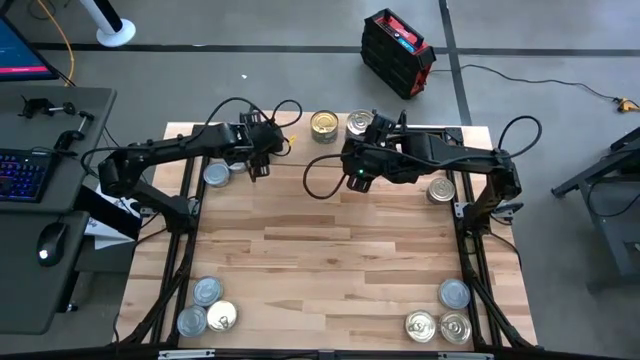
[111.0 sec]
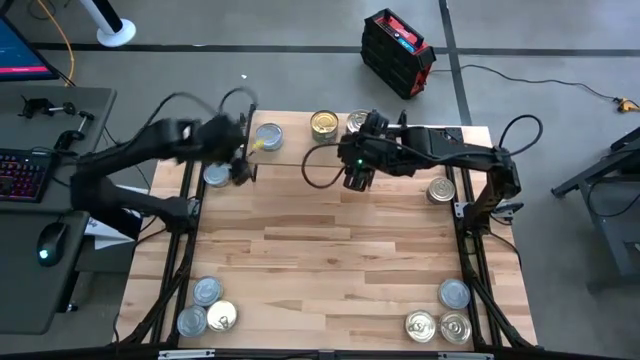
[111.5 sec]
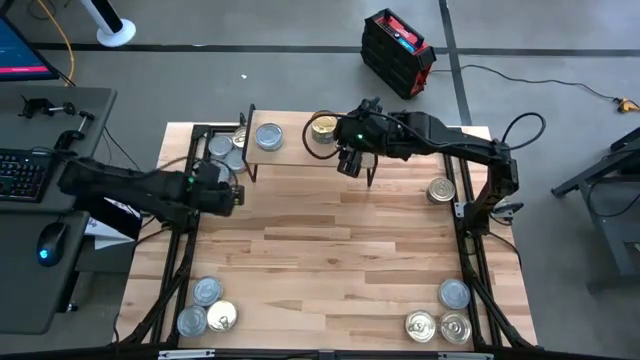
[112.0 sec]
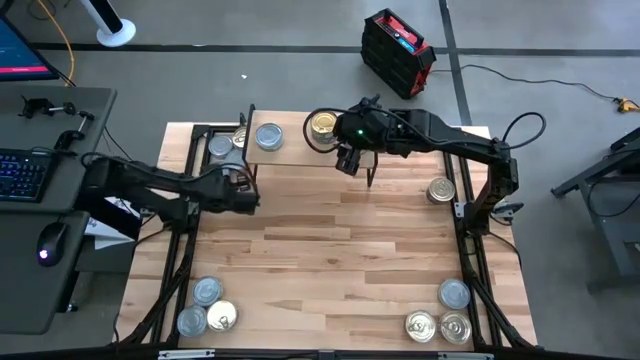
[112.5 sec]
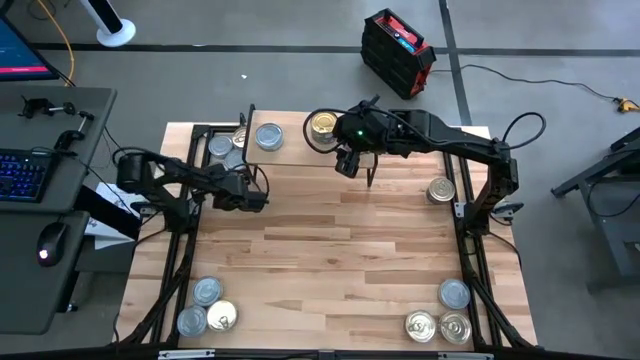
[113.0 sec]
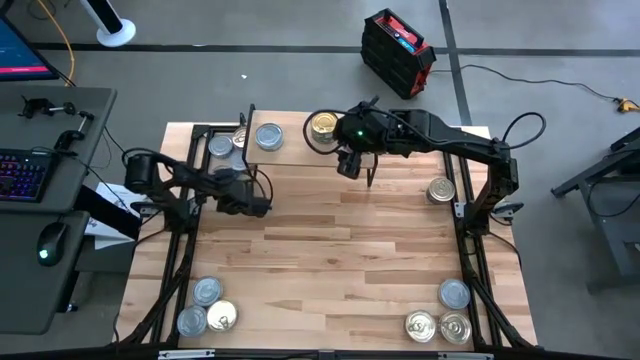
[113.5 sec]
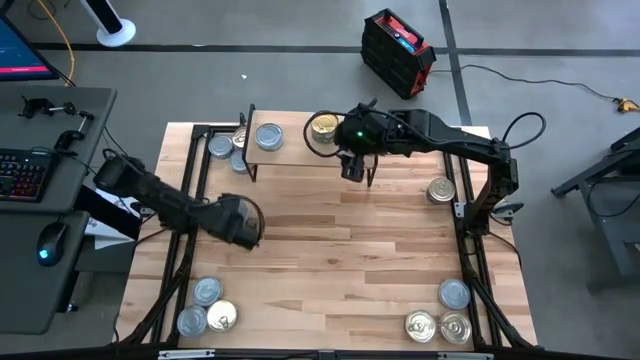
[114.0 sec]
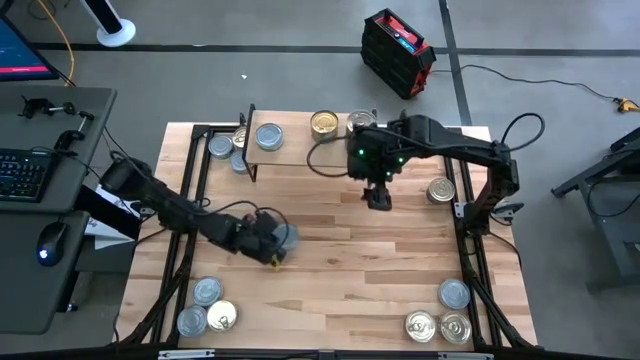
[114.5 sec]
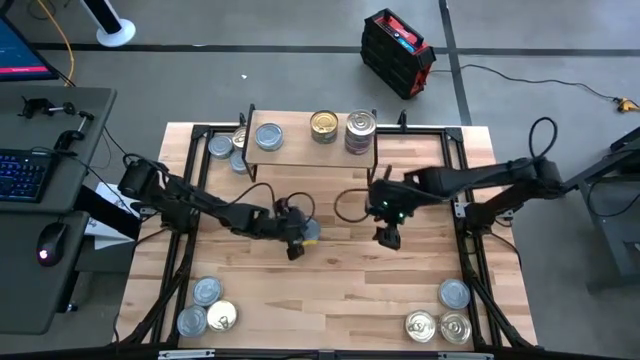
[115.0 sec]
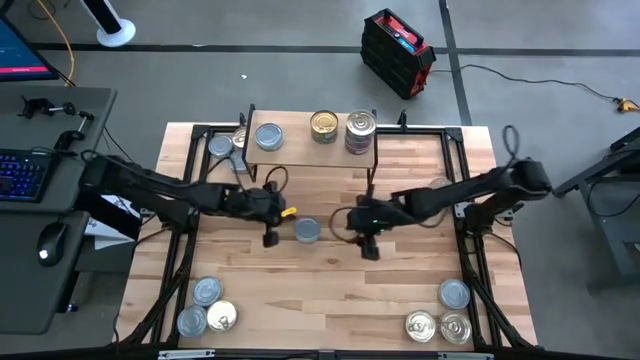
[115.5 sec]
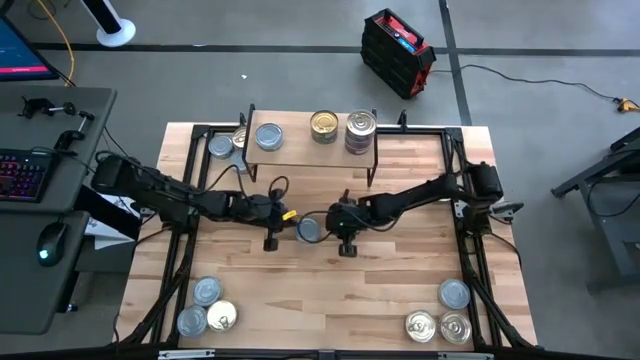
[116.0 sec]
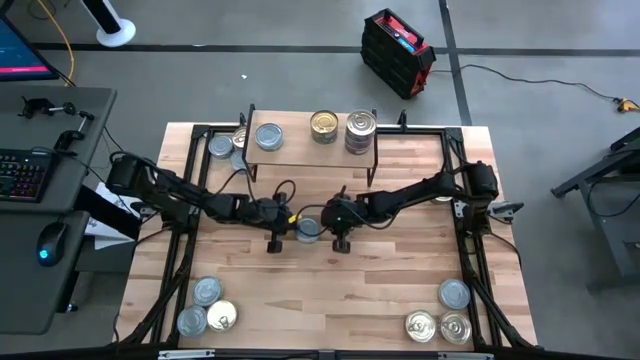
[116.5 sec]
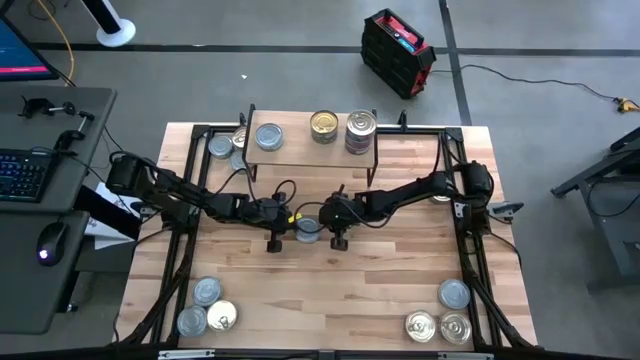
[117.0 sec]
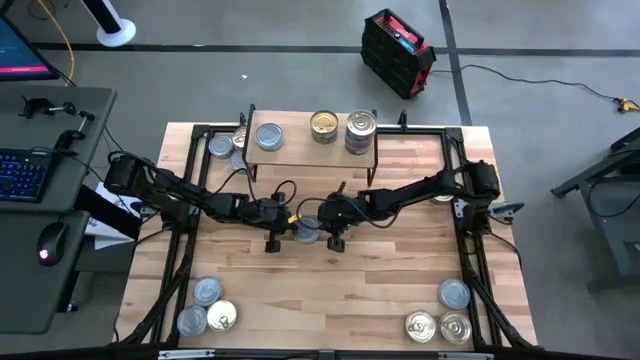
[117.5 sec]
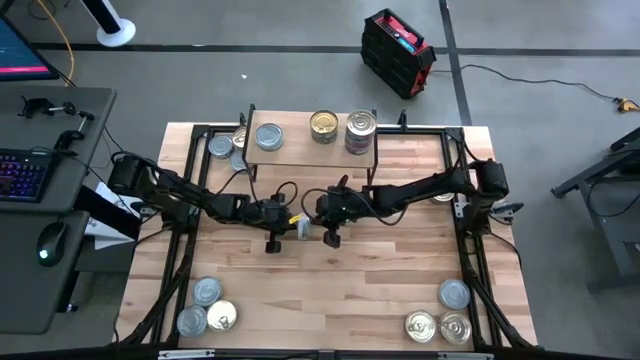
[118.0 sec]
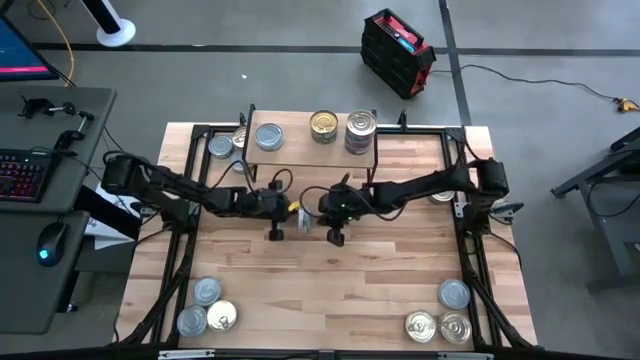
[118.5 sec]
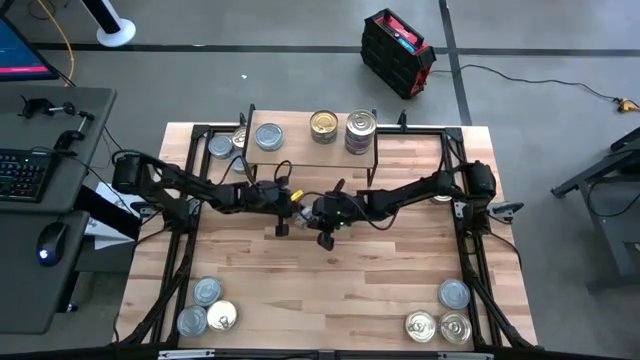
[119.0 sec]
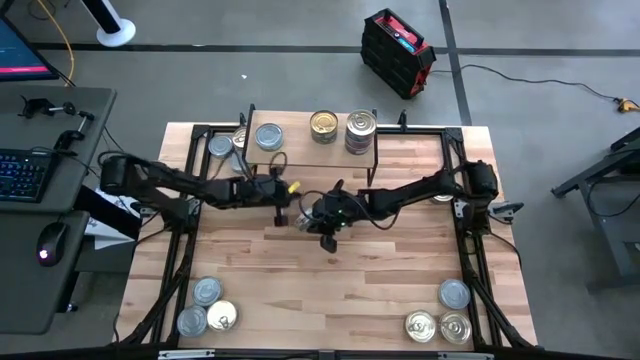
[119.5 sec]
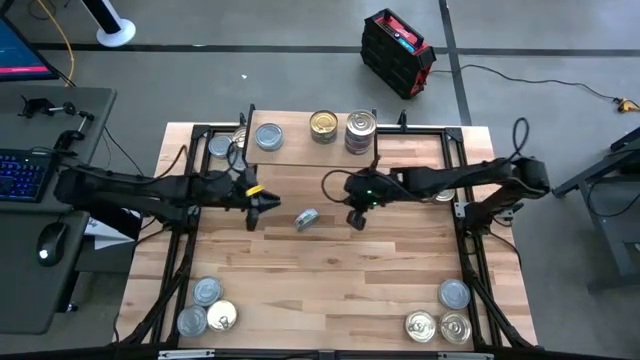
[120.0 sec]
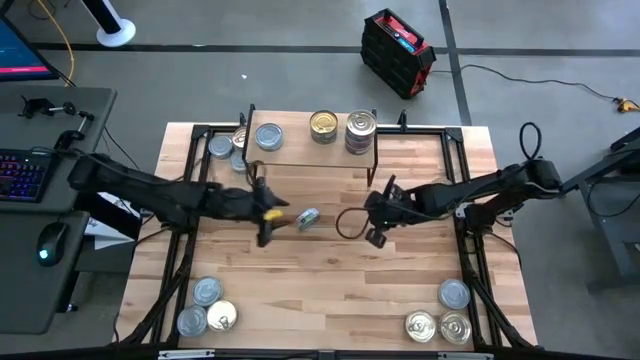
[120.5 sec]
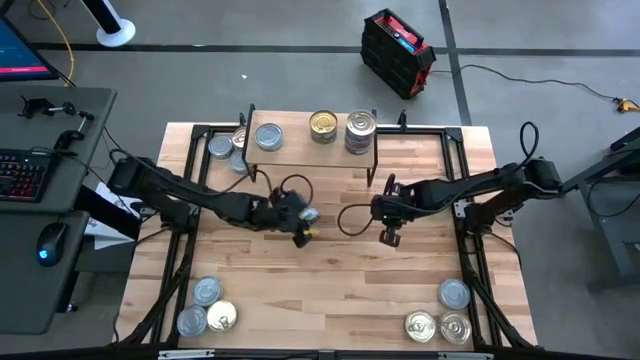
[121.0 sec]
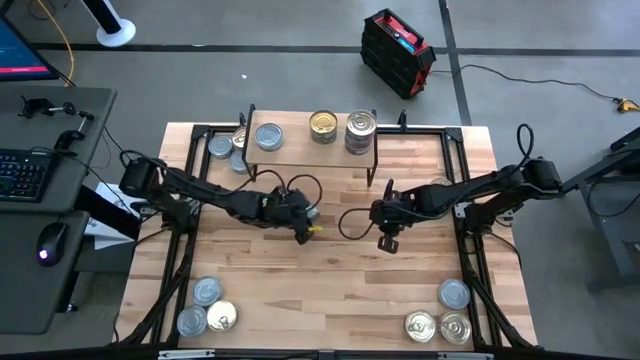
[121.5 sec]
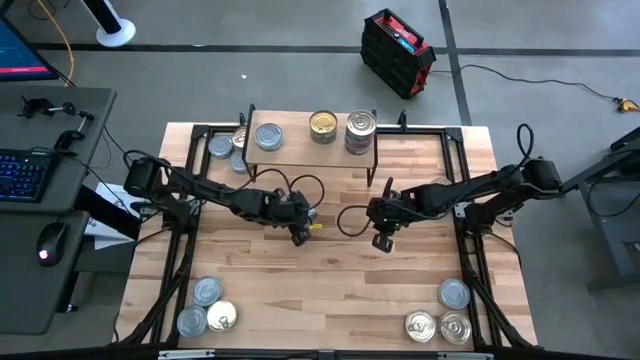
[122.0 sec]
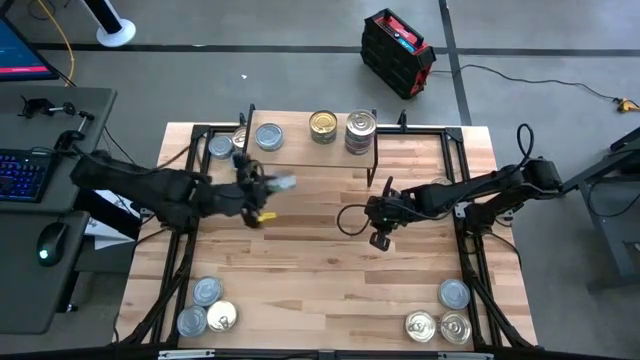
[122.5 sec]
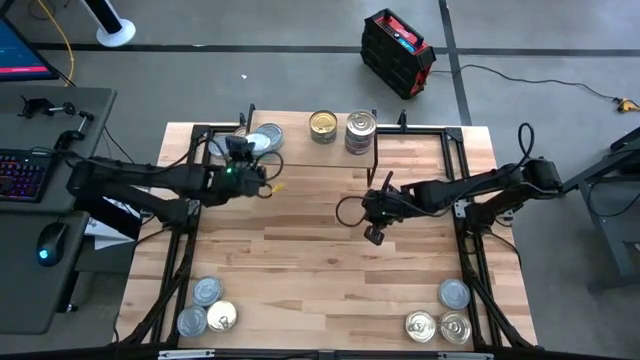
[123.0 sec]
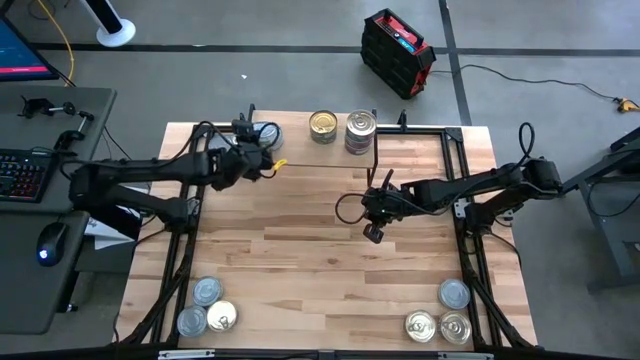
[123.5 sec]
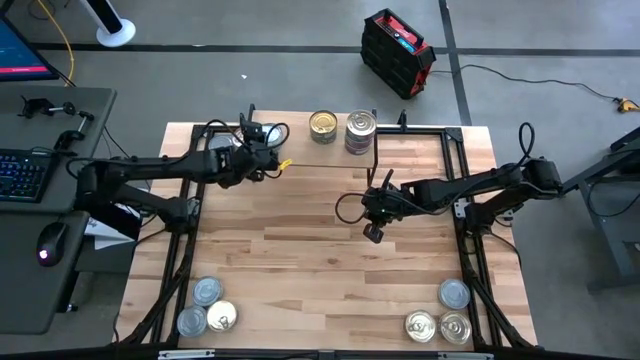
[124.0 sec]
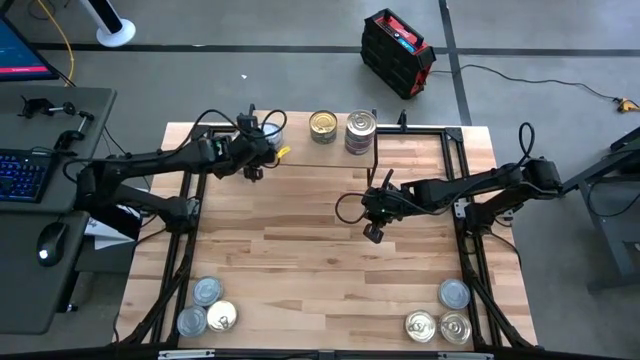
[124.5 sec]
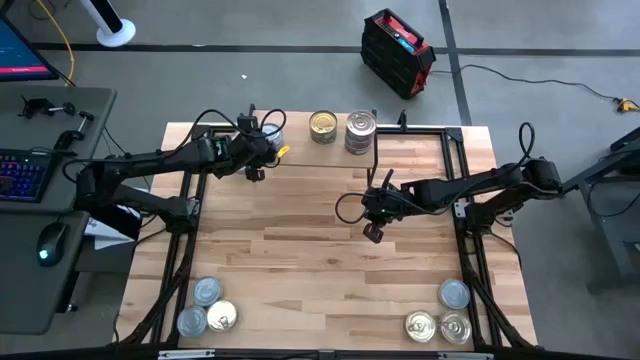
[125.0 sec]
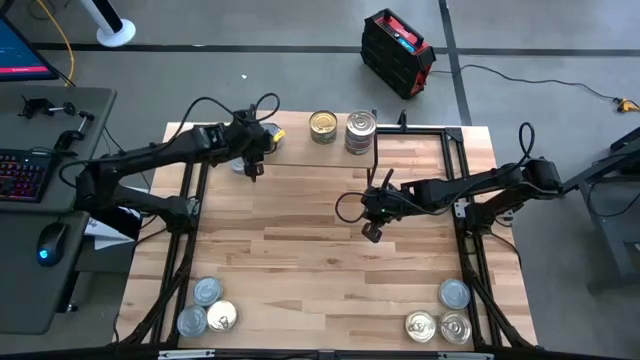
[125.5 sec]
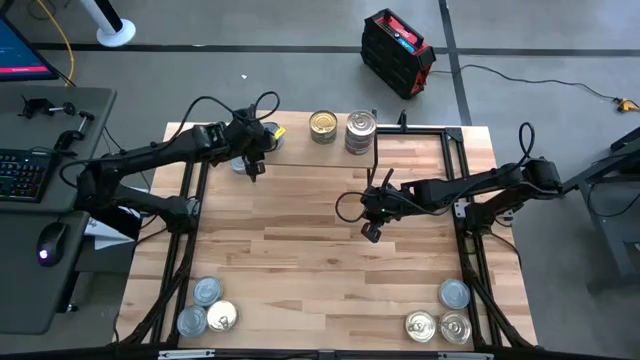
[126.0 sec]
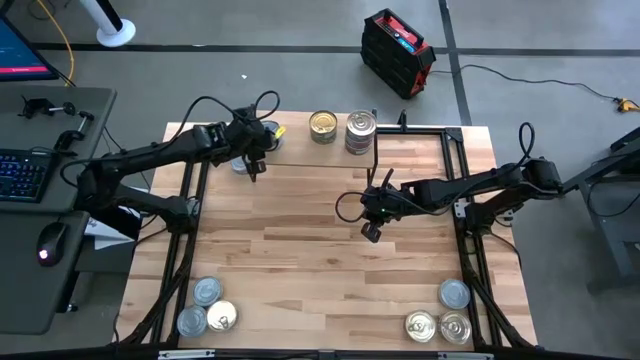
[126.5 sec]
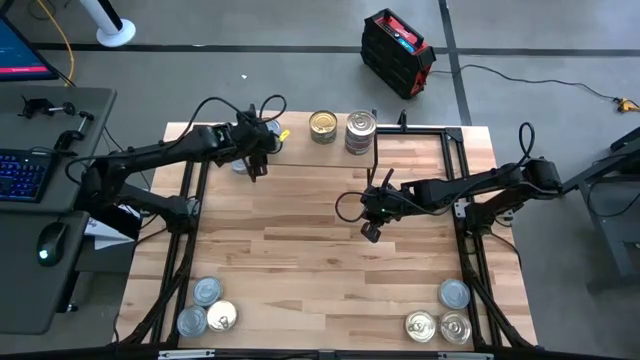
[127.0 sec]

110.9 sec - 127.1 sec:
Task: Stack canned seafood by type on shelf
Stack the green white tuna can on top of the other green white tuna can on the shelf

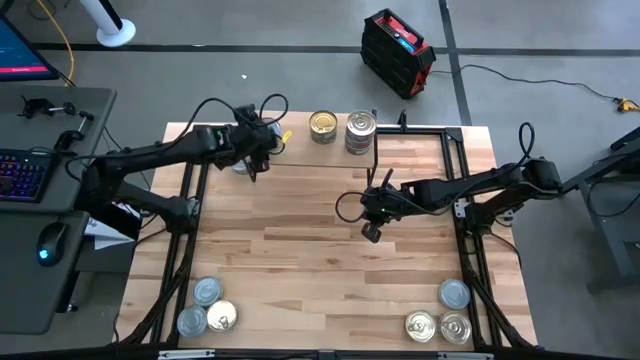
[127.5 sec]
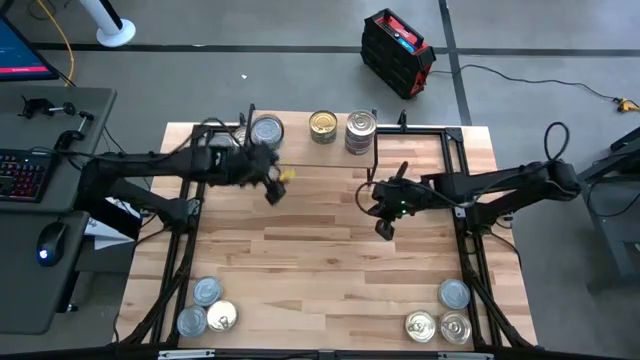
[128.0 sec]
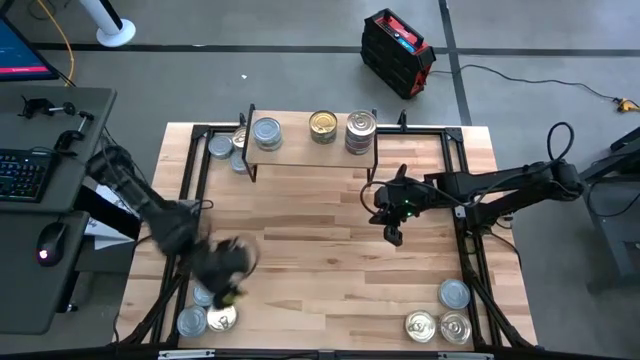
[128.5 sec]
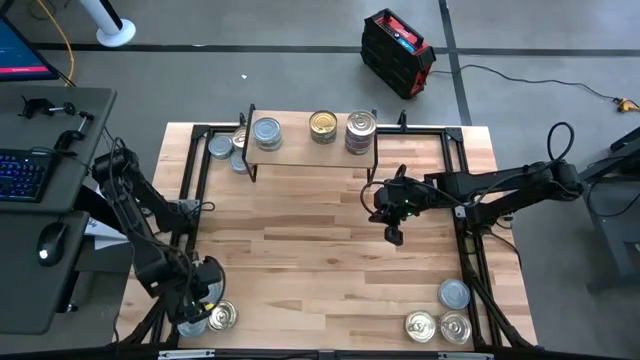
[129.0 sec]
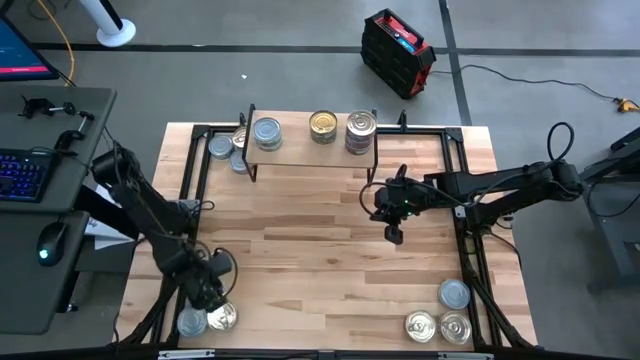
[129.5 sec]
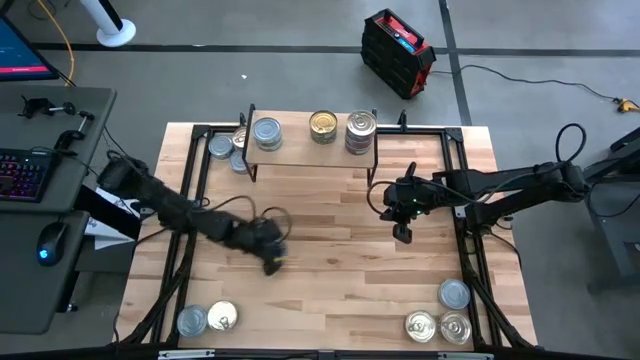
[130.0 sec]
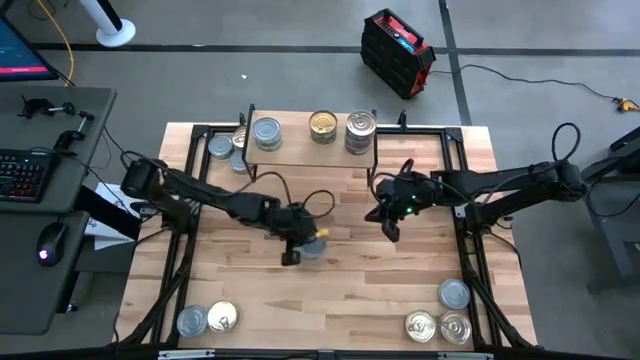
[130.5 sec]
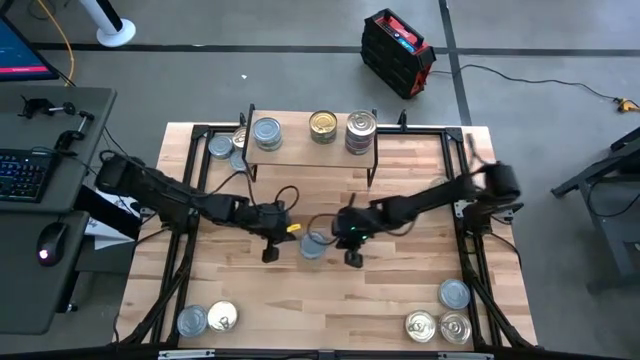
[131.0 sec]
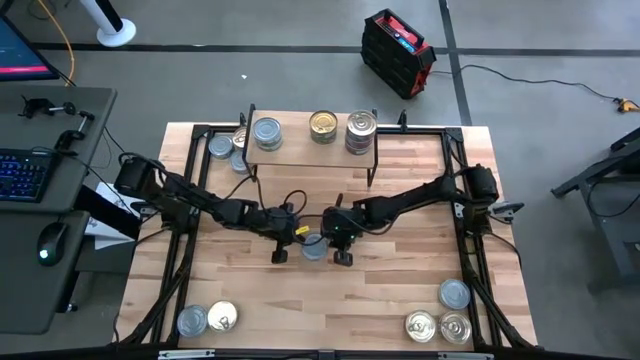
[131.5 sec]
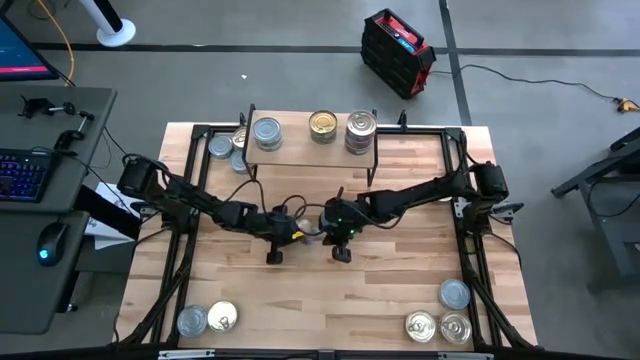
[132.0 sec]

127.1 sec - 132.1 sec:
Stack the green white tuna can on top of the other green white tuna cans on the shelf
